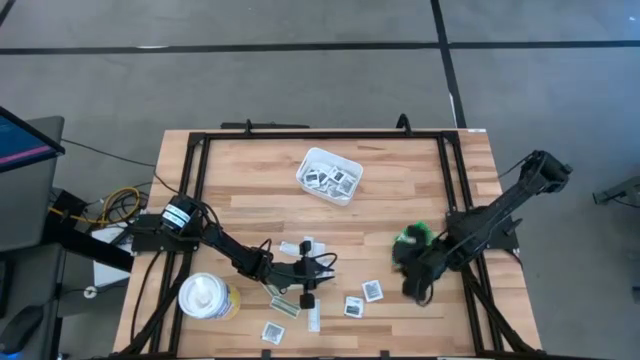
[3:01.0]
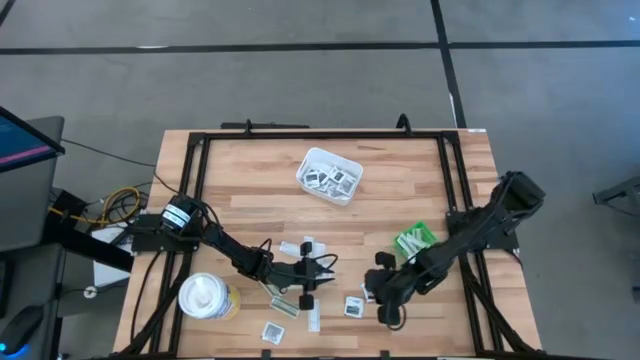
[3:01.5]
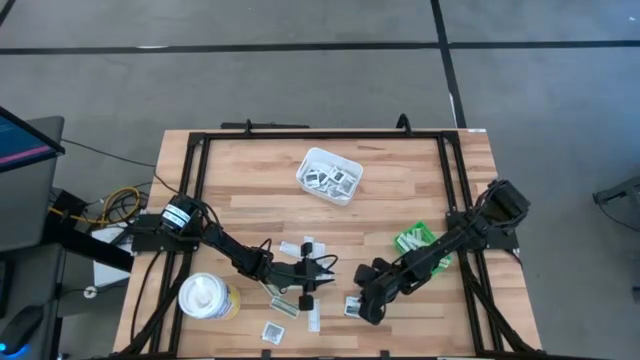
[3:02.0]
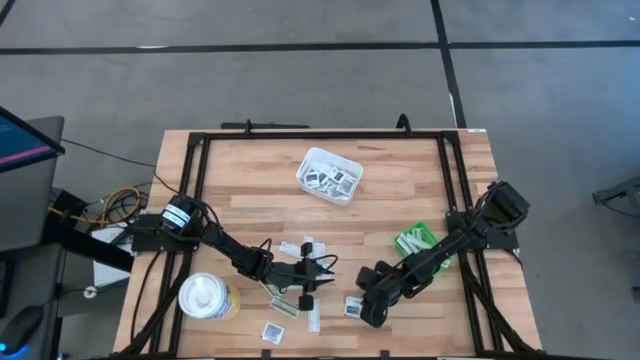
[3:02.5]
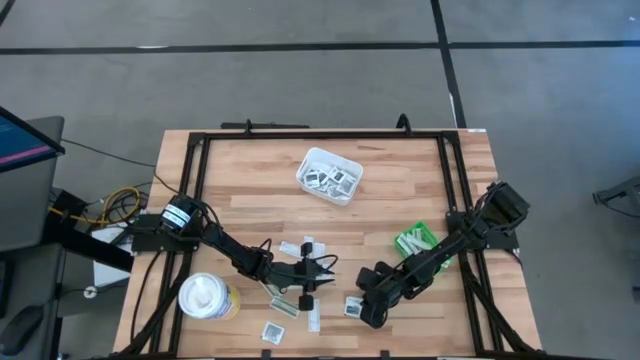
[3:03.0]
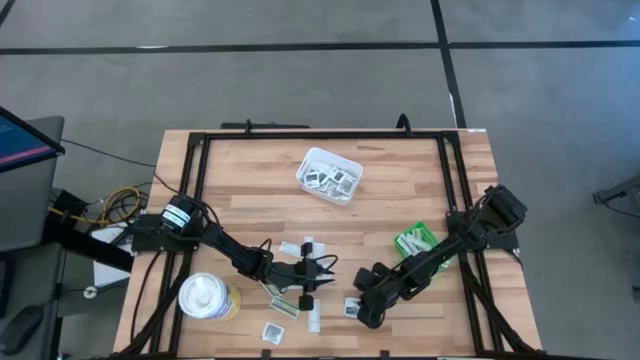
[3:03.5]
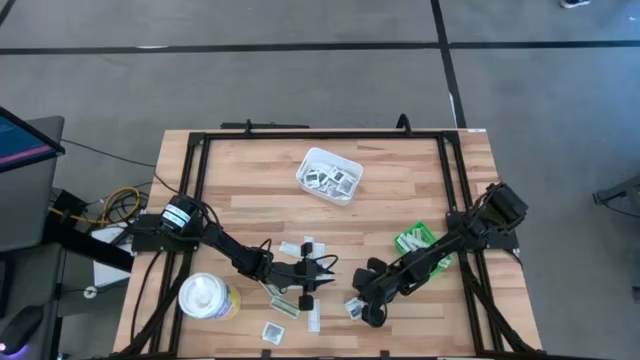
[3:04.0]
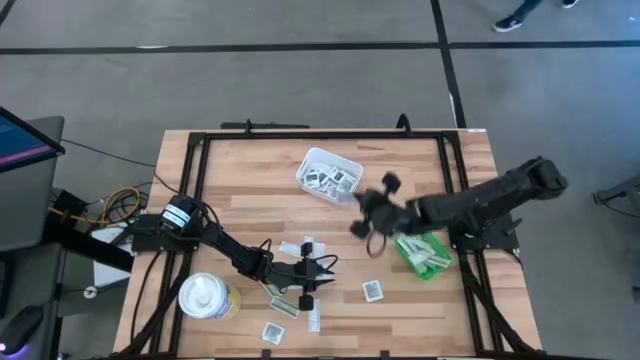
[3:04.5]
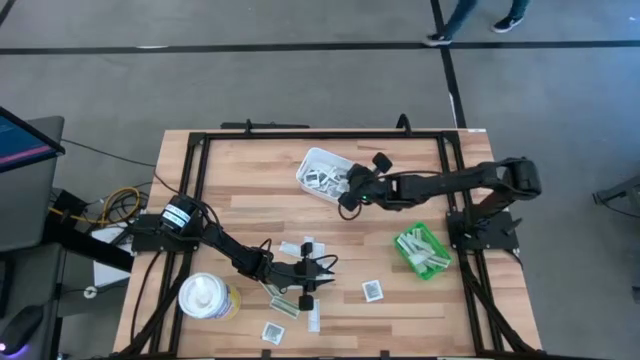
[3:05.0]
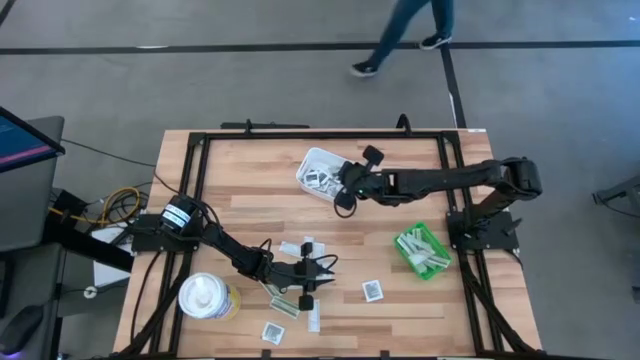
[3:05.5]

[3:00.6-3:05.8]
Task: Pick & Place First Aid Supplies
Put the towelette pack into the white bin

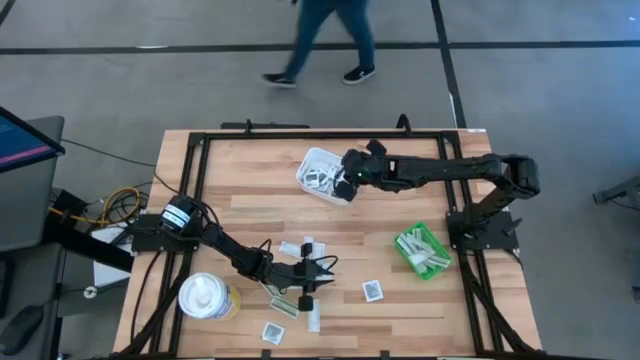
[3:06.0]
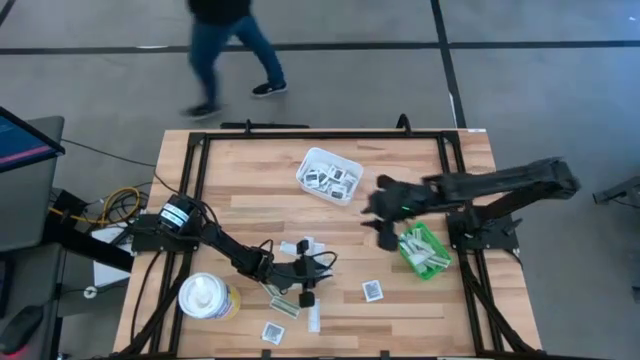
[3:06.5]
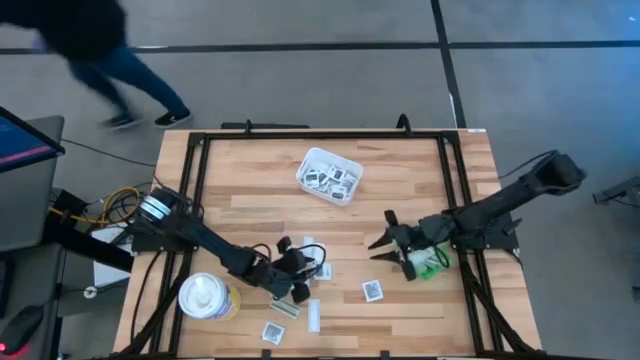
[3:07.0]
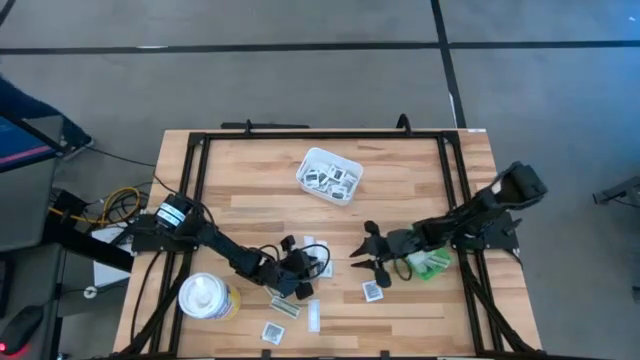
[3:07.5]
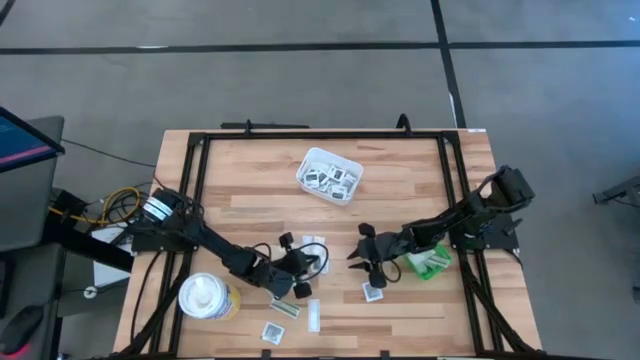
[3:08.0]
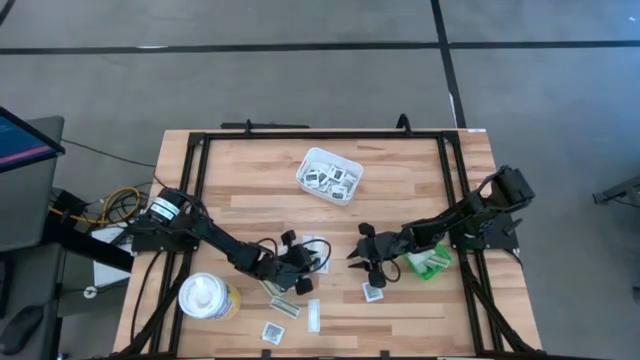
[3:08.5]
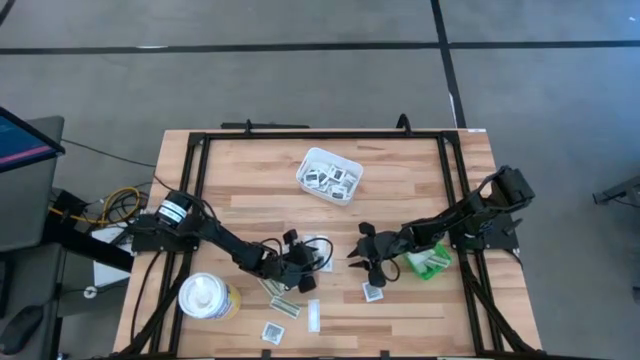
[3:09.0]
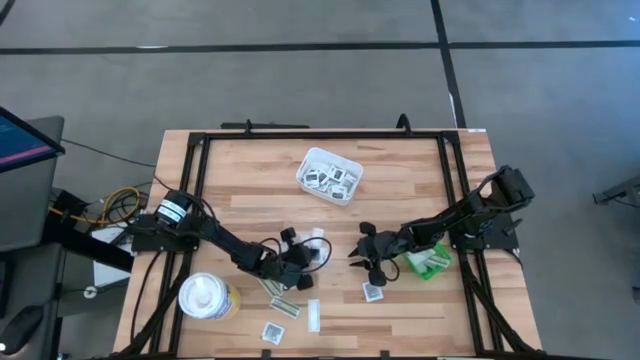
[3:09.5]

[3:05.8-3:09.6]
Put the towelette pack into the white bin

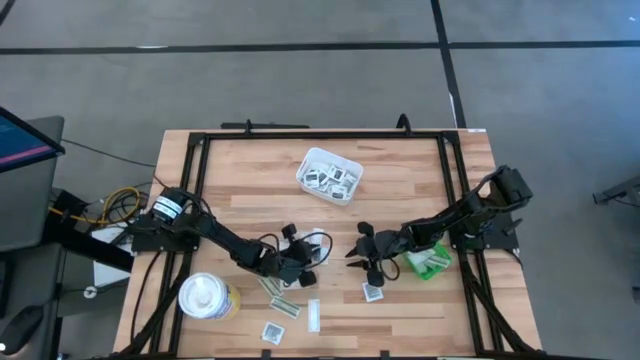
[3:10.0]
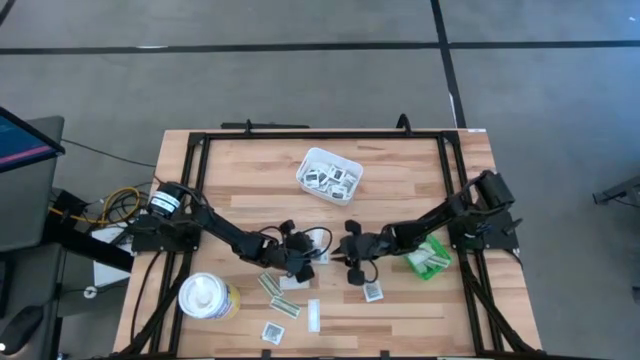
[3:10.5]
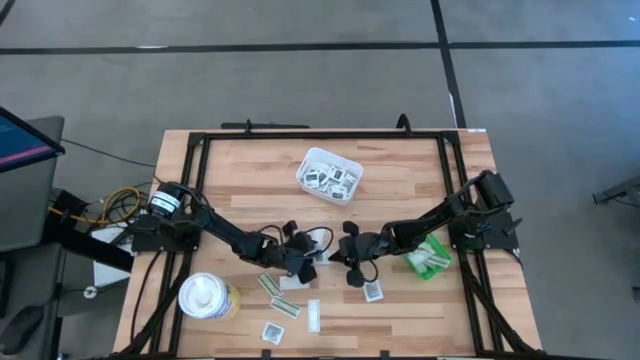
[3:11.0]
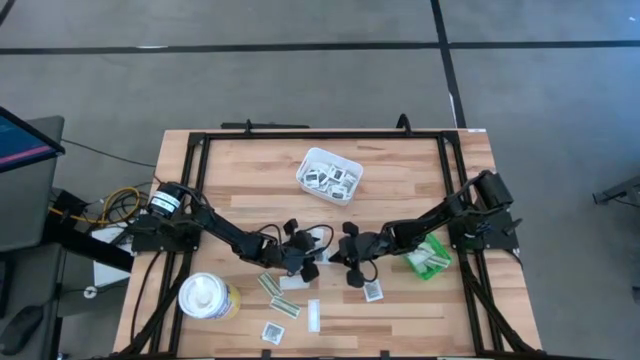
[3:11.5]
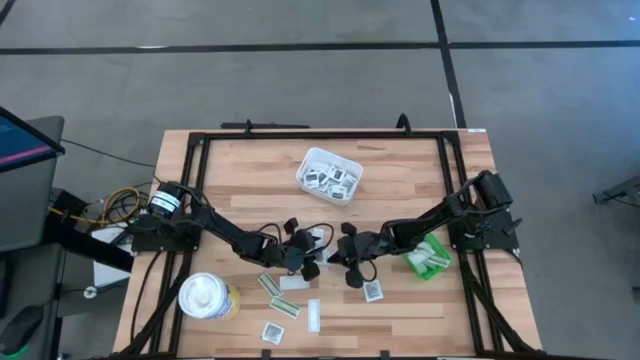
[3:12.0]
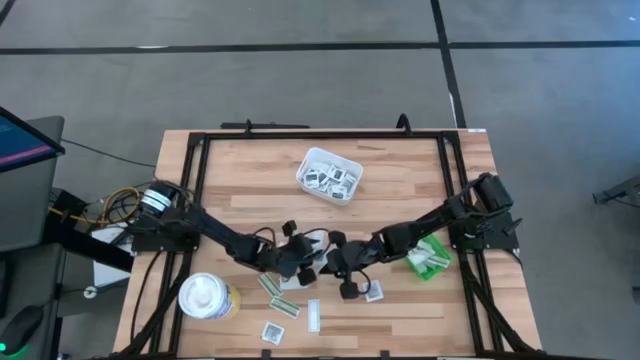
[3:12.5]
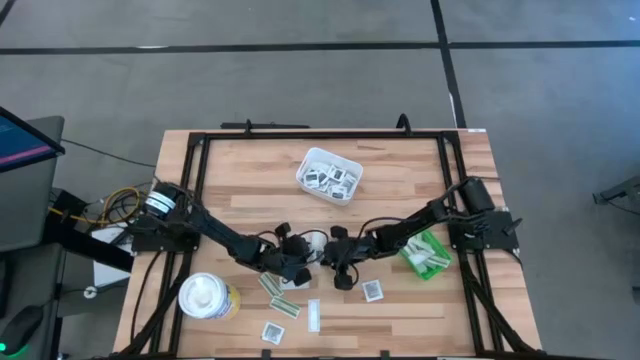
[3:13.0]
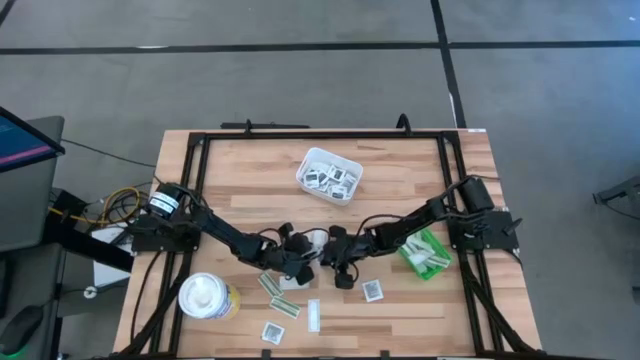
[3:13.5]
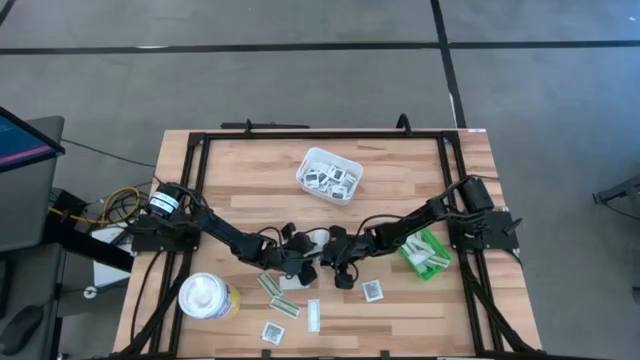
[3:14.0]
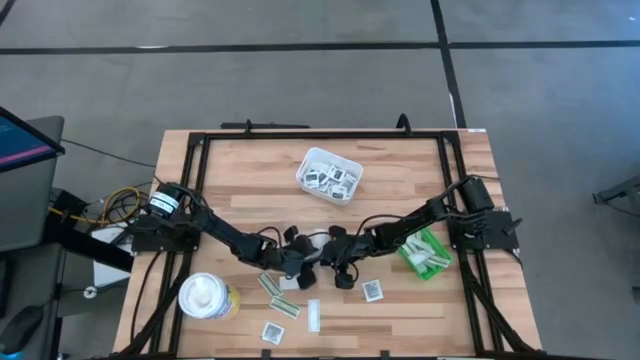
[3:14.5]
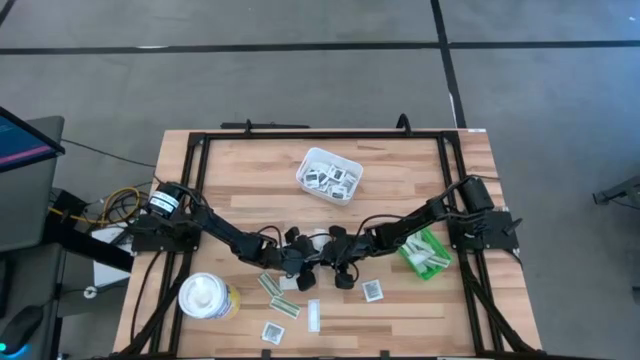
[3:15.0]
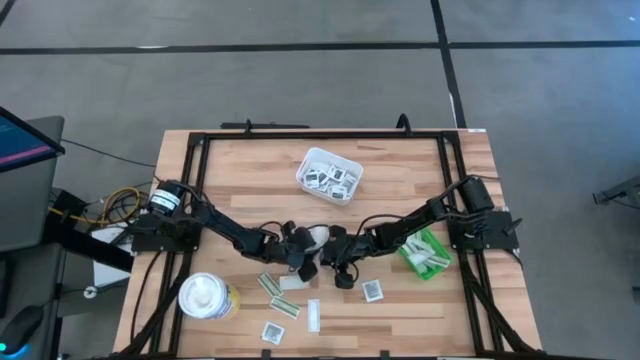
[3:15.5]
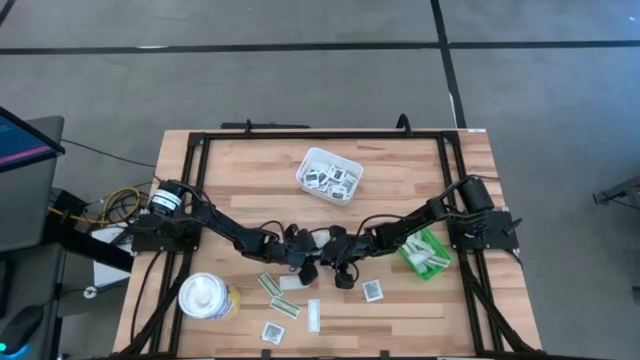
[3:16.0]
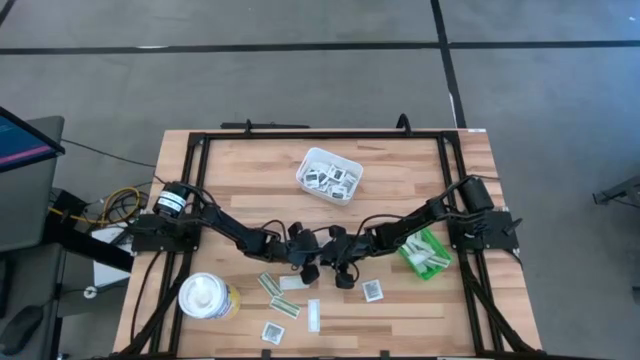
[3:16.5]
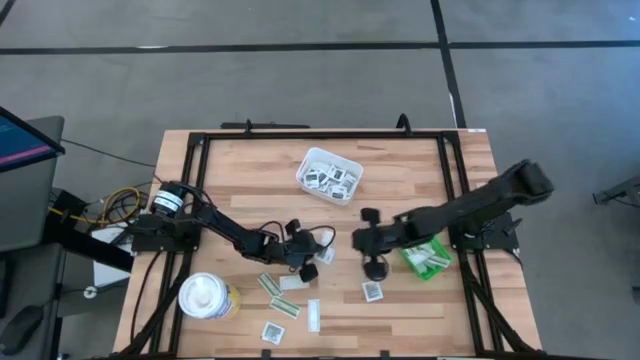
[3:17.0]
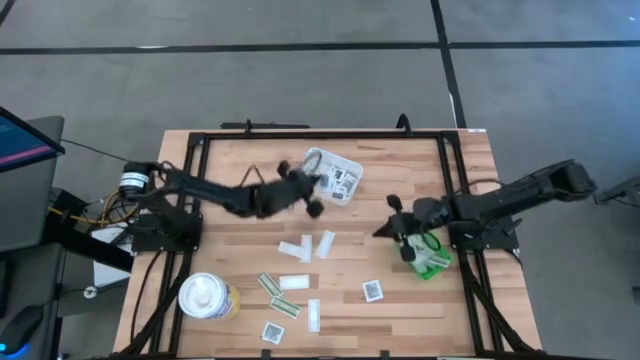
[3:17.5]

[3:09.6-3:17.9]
Put the towelette pack into the white bin

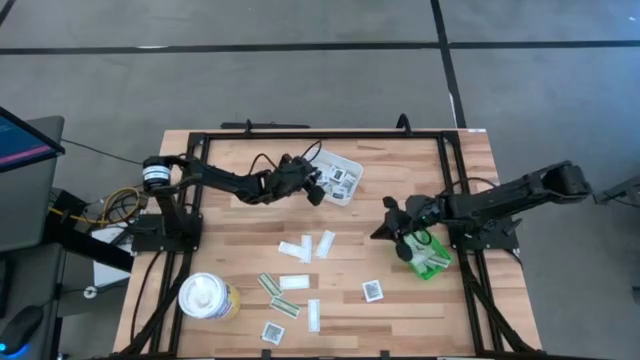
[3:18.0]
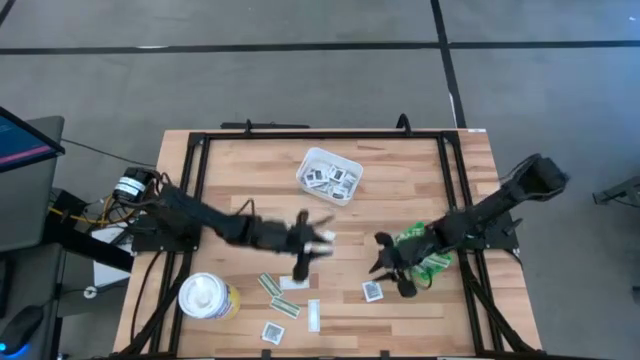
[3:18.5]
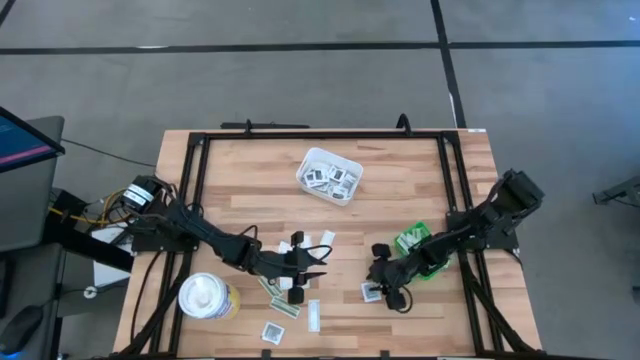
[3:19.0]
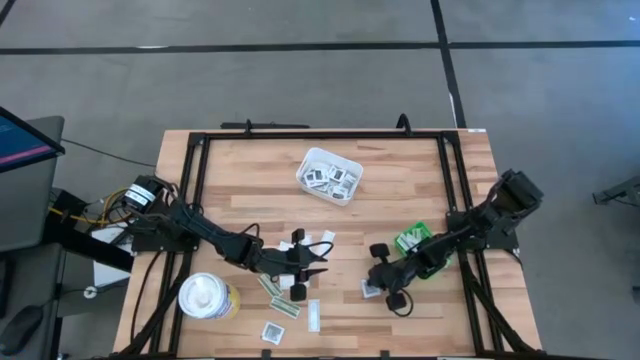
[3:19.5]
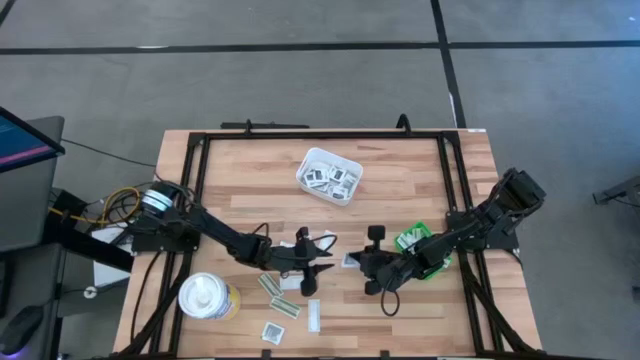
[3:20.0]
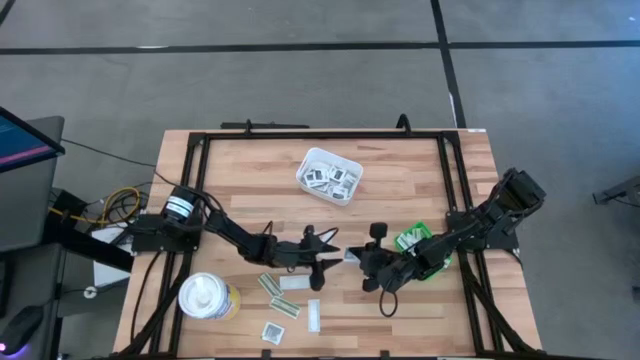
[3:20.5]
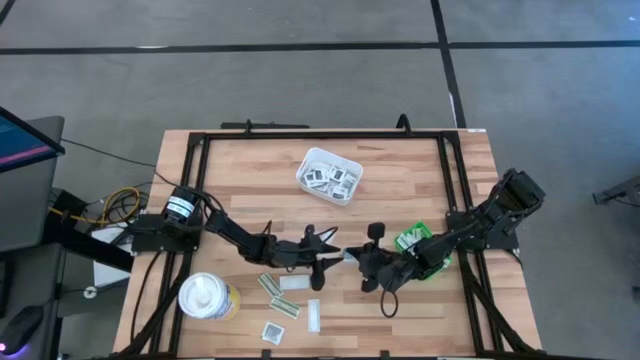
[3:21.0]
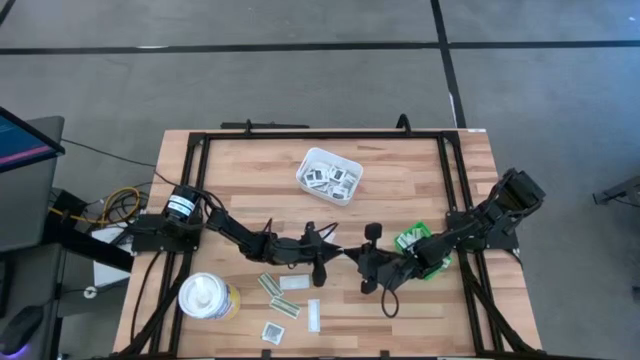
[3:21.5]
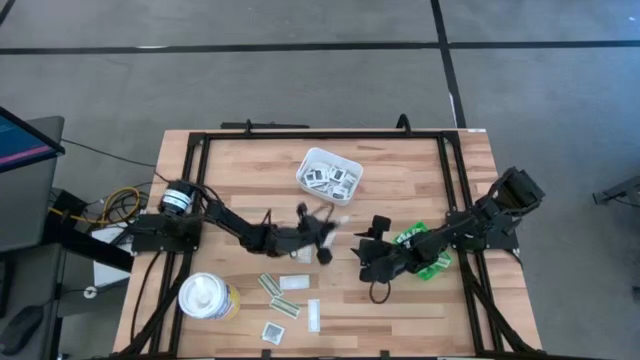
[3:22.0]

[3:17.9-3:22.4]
Put the towelette pack into the white bin

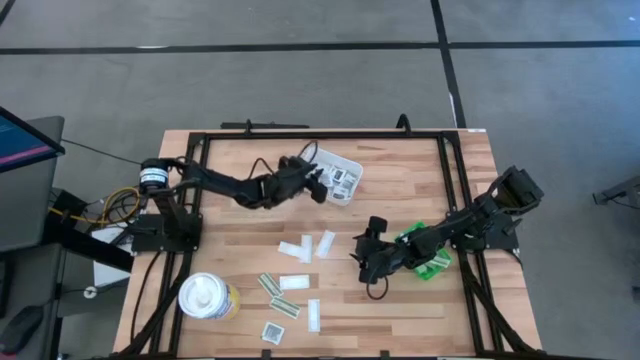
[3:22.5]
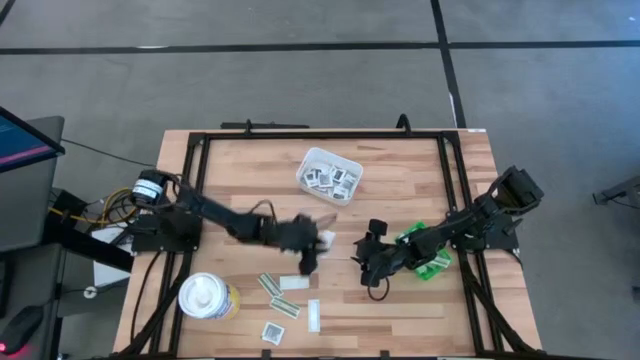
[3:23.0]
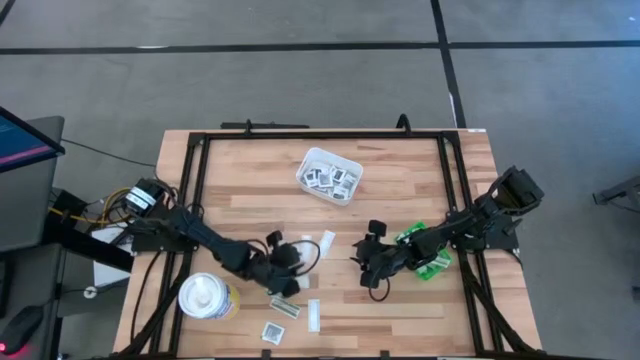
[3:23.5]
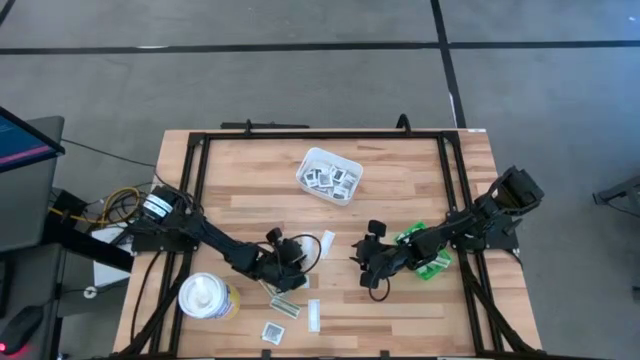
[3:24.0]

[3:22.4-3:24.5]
Put the bandage pack into the green bin
